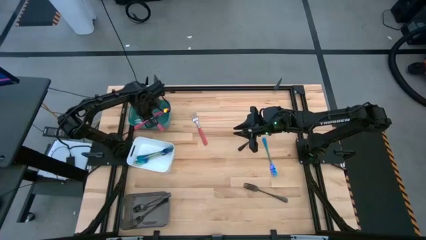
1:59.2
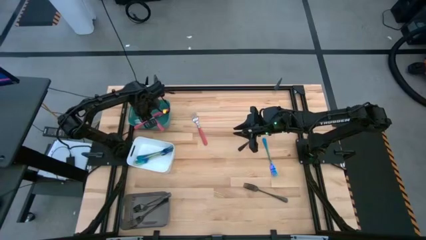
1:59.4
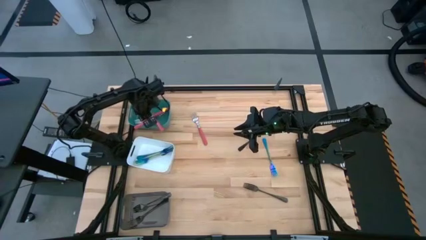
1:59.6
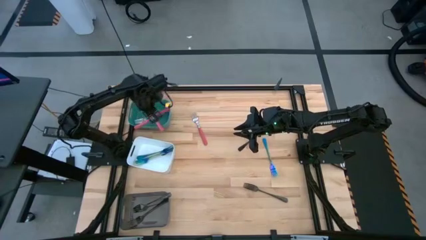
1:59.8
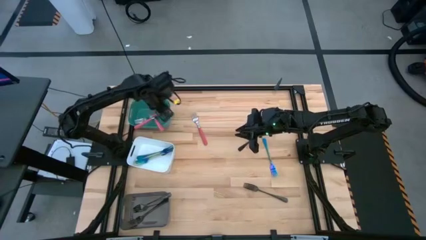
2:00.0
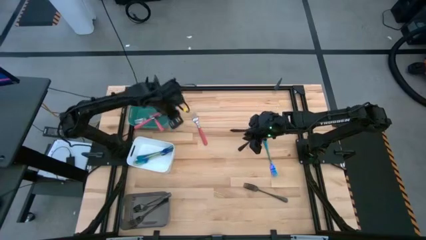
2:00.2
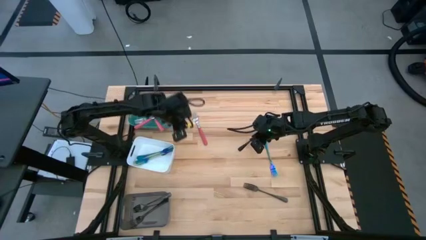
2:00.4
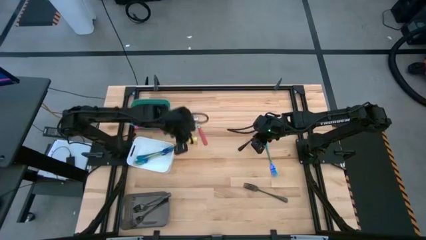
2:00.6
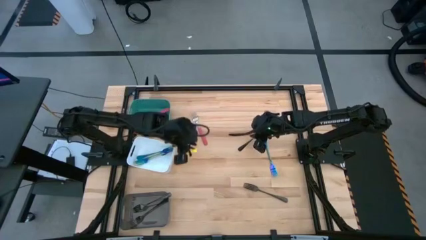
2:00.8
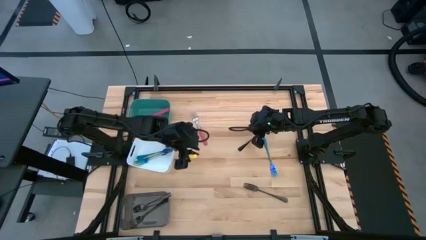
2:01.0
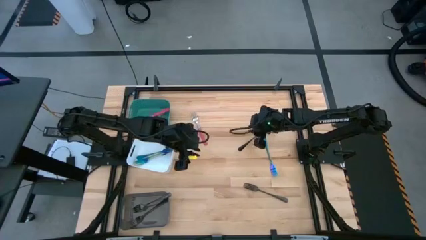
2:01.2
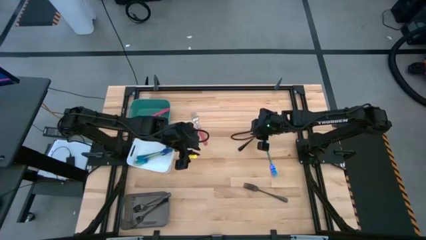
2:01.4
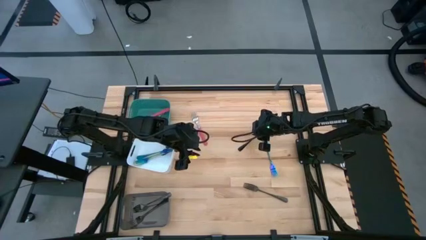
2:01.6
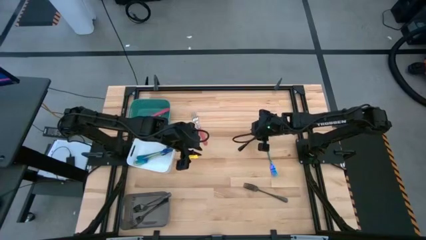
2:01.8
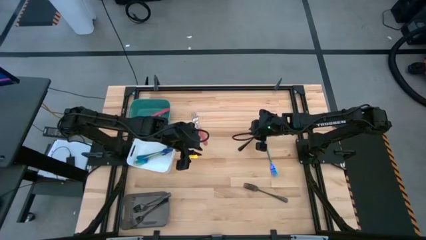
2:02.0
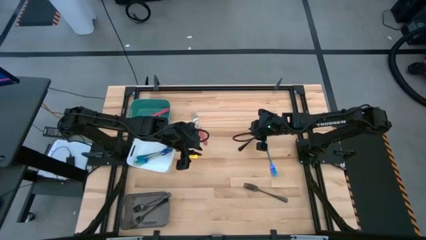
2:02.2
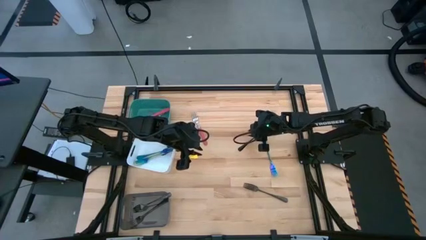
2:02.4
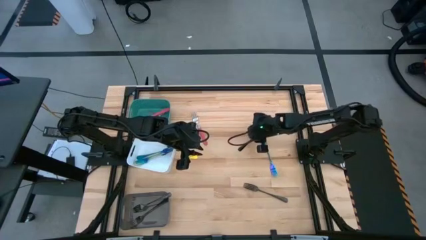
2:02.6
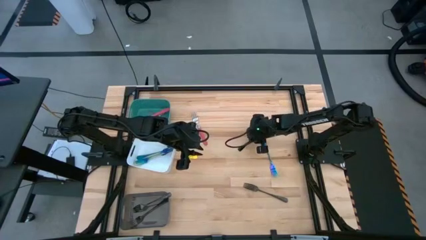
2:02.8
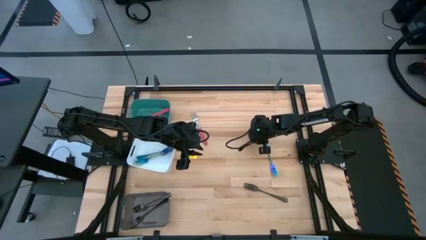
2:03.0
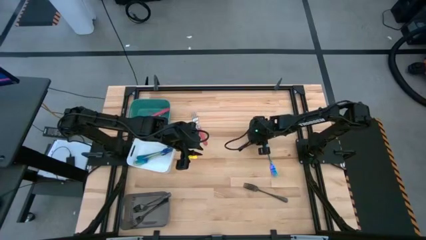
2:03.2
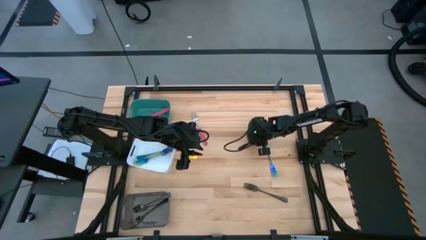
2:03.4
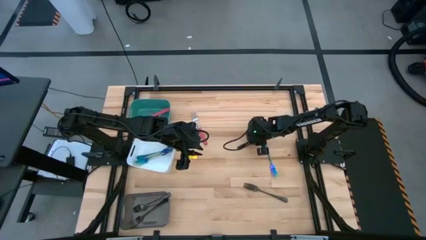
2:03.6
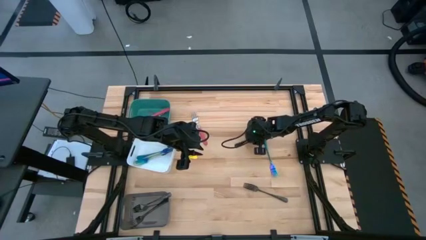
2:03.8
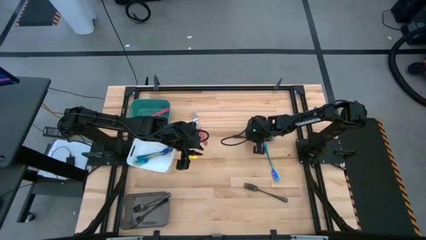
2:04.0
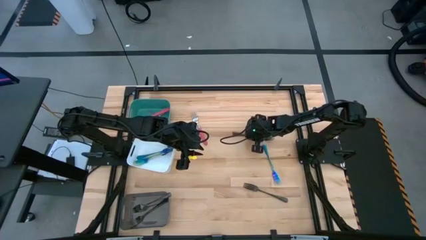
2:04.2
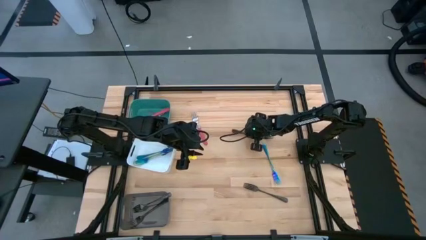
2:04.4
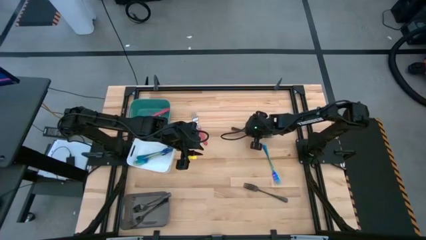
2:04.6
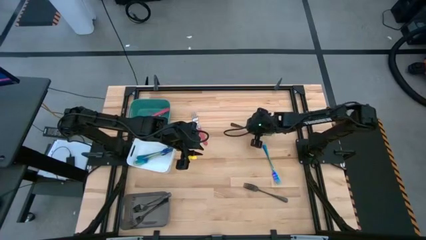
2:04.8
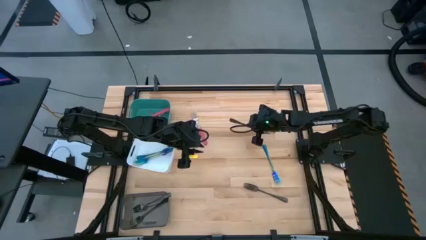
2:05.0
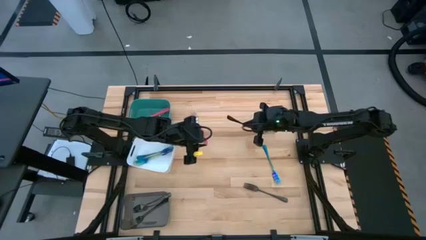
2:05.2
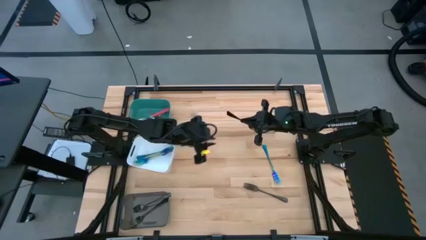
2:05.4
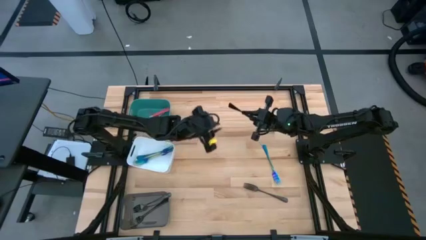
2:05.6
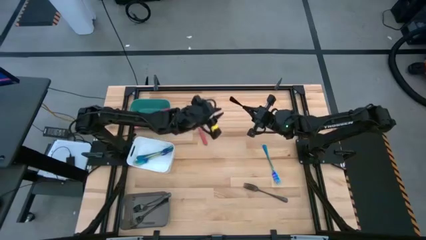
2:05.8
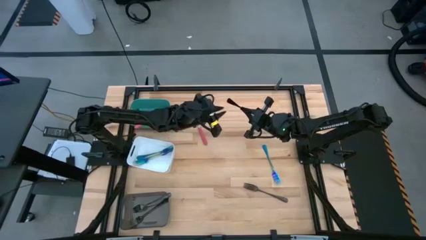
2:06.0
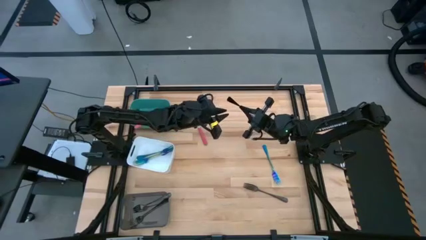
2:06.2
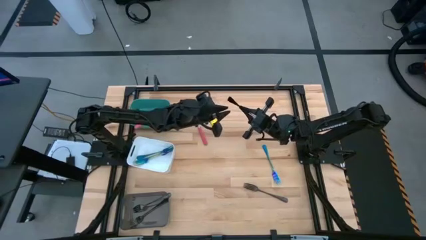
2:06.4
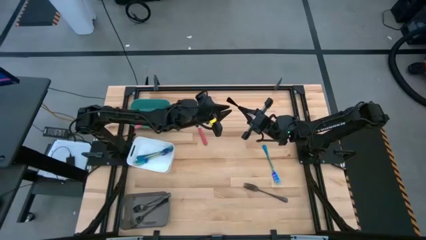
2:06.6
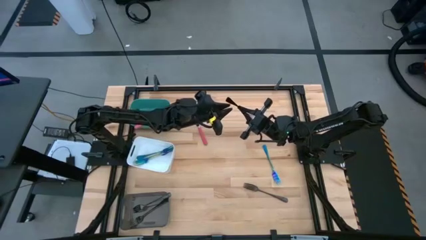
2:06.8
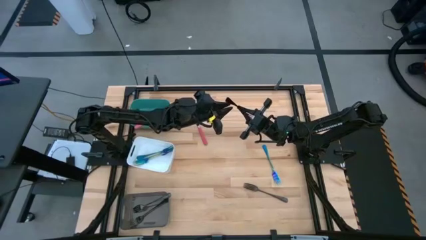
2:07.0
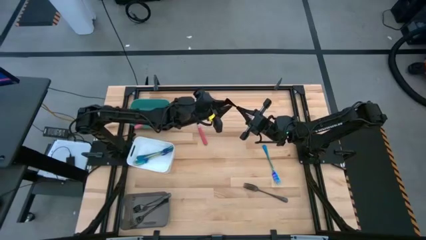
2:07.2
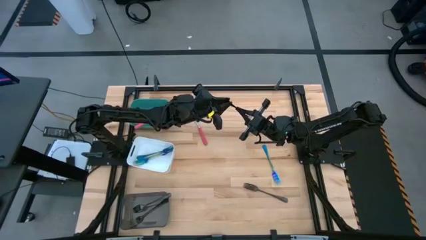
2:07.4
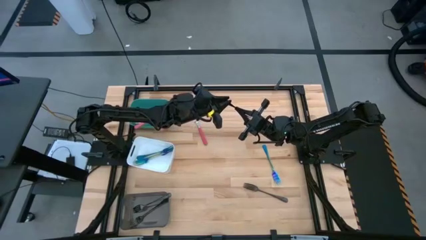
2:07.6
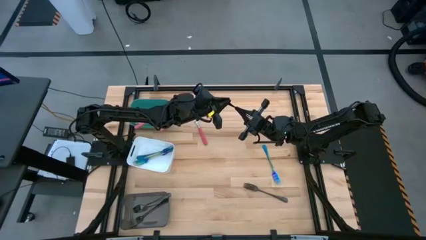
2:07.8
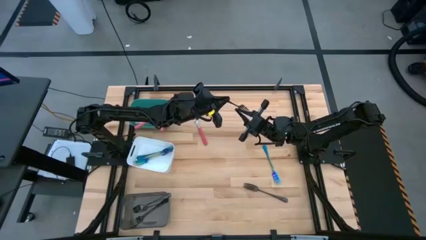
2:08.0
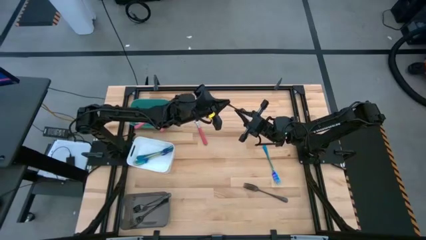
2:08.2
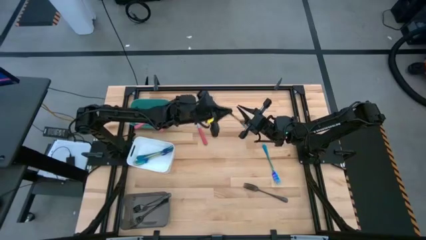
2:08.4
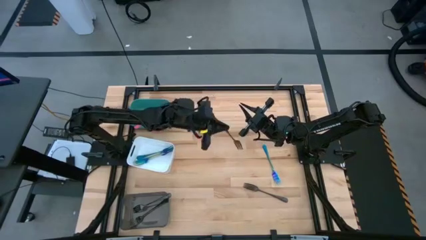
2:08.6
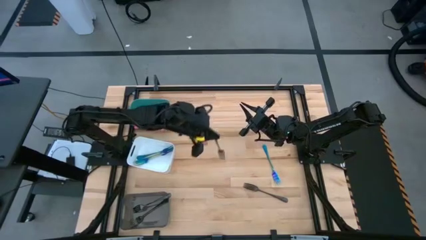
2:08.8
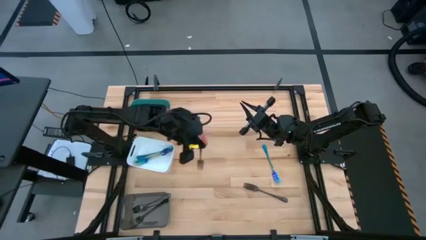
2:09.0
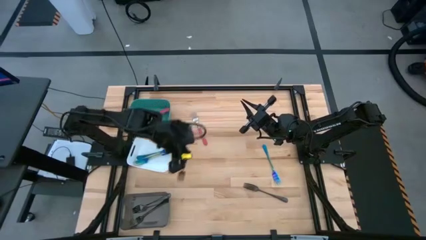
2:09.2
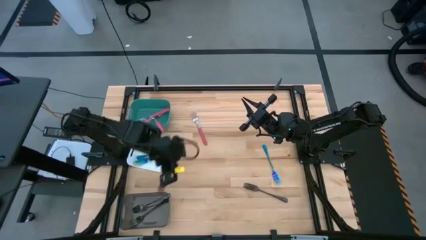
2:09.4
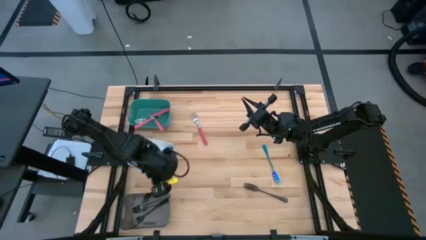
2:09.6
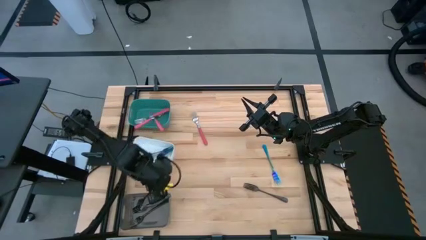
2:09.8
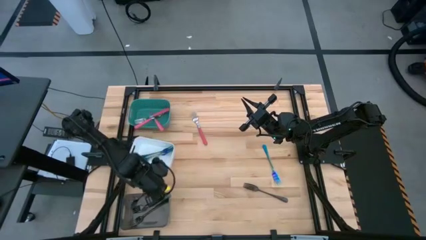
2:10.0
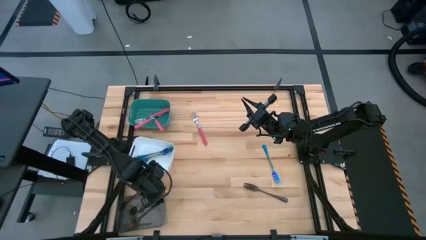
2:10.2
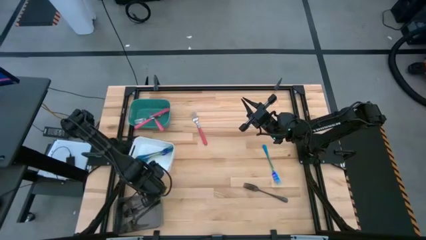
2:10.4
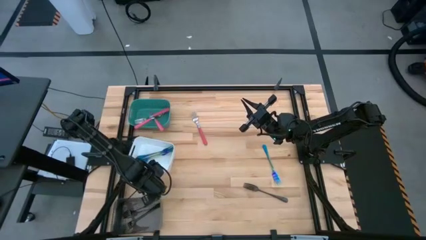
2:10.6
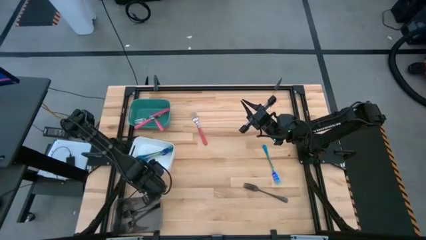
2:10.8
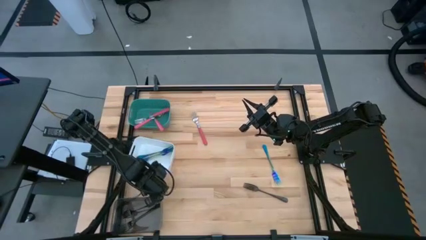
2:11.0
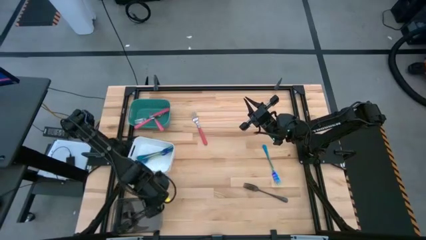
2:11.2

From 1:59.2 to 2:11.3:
Task: Sort silverware by color (type)
Put the black fork into the black bin

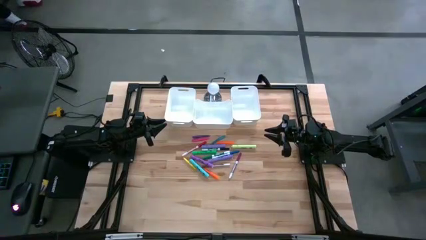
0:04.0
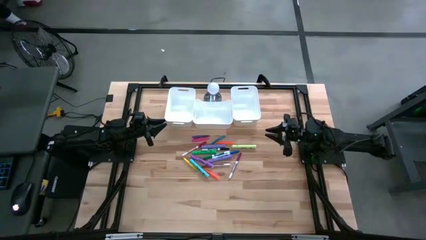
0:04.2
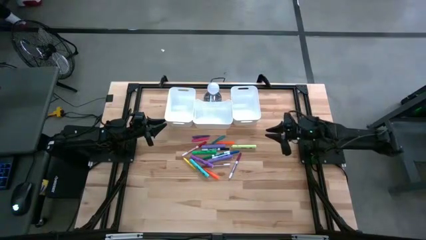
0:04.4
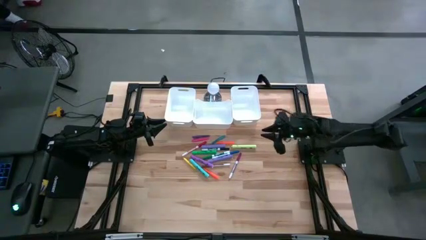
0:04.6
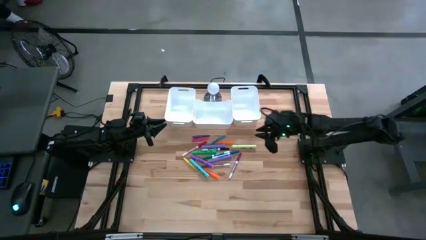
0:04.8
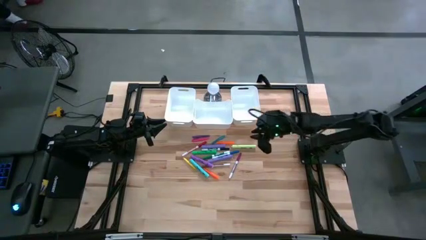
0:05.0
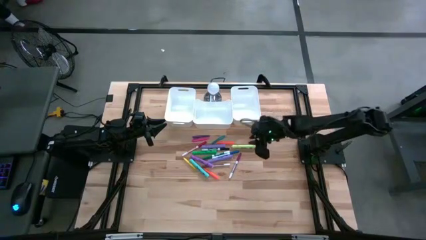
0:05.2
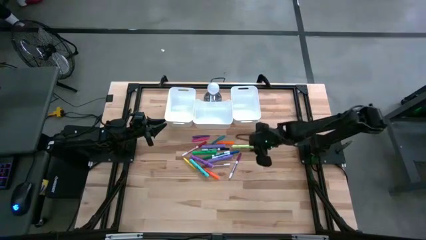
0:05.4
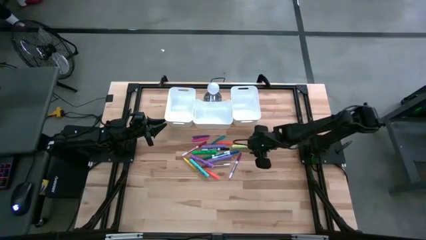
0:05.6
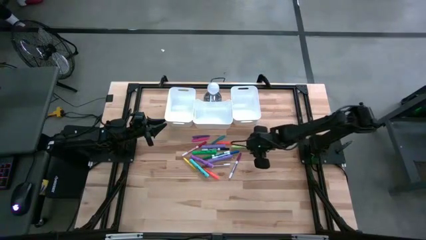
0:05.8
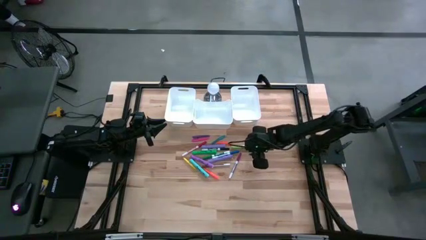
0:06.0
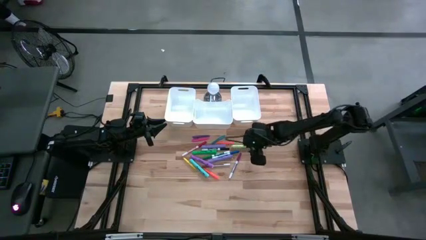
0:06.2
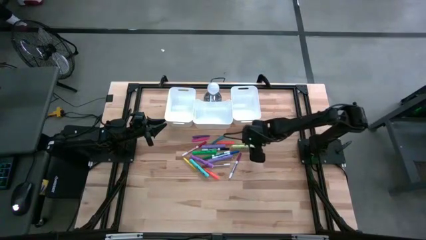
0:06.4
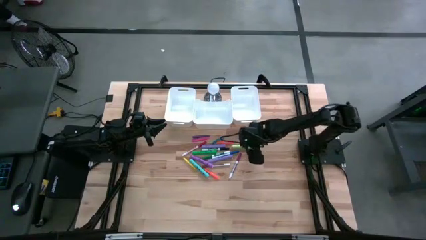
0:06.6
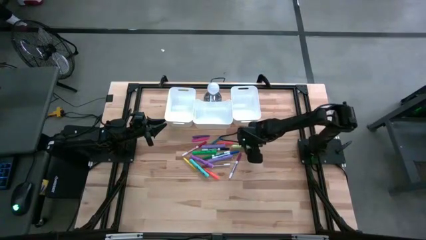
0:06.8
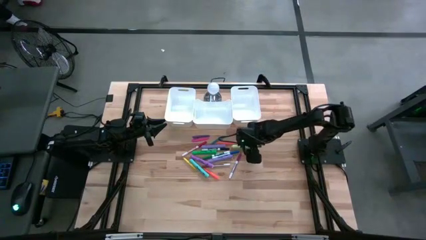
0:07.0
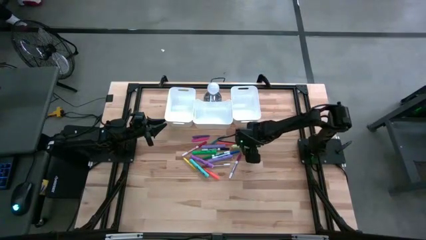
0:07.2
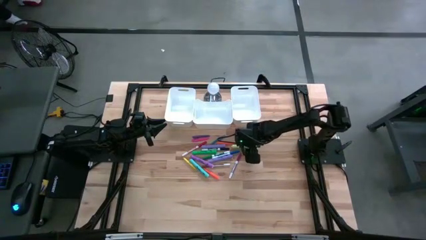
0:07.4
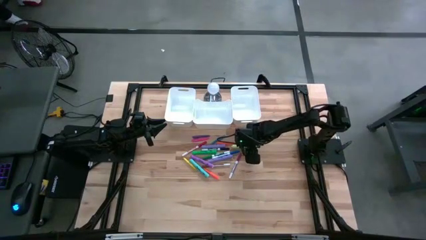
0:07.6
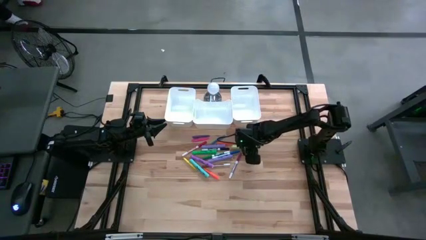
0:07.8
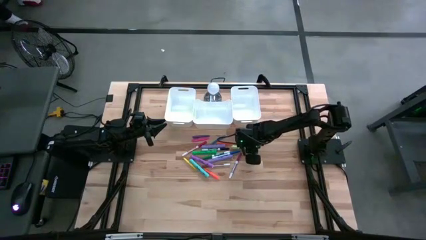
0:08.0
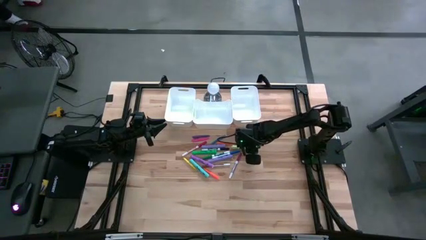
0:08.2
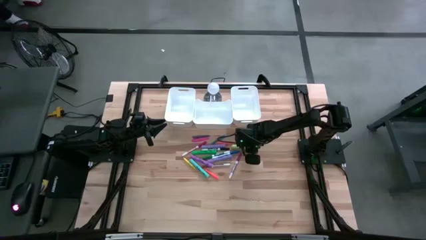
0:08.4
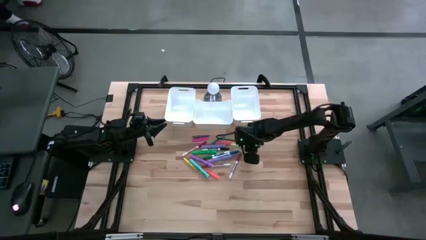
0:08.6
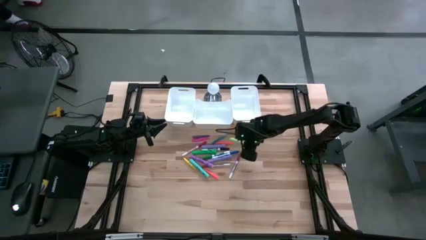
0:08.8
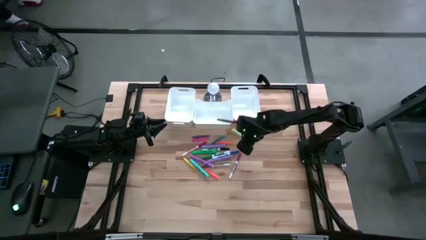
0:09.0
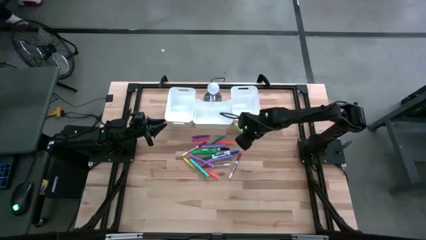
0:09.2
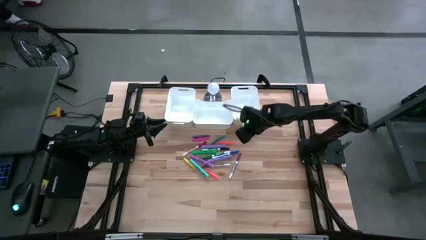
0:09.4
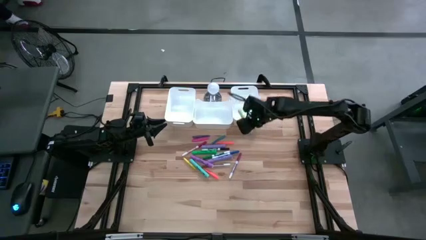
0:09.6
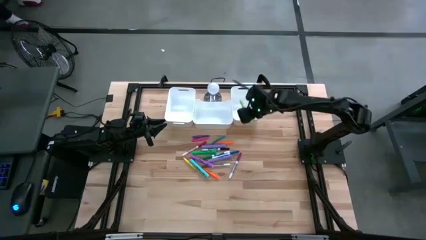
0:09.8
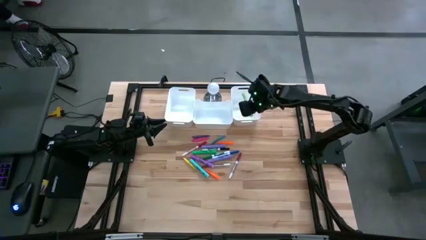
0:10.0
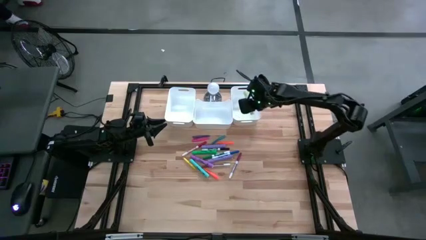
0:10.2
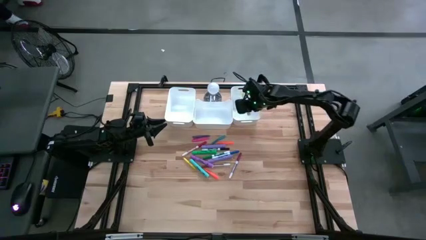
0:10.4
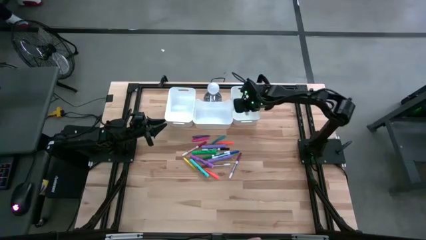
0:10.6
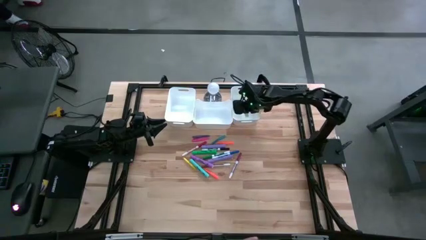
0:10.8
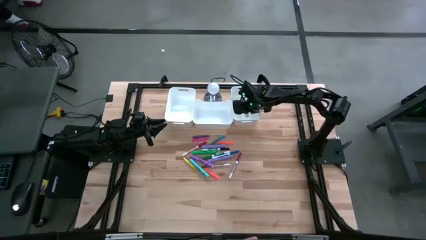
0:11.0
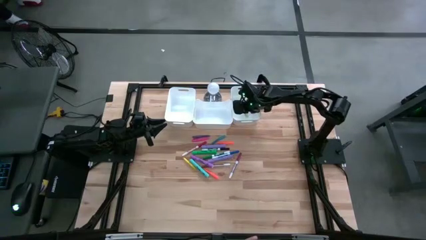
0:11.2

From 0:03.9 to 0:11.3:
Task: Pick & Place Markers
Put the light green highlighter pen into the right white bin
